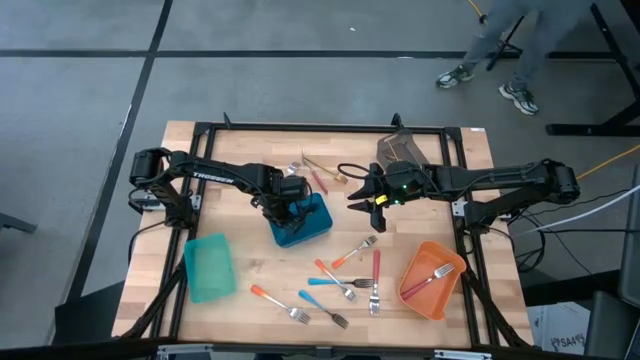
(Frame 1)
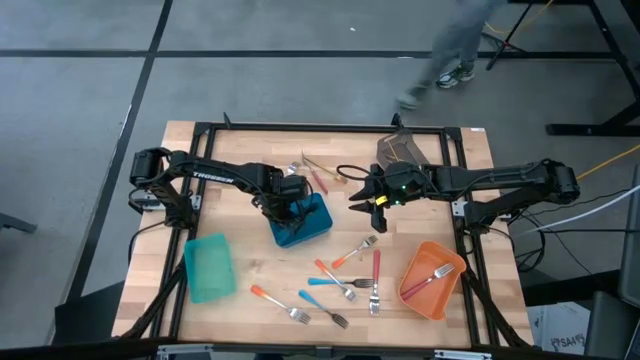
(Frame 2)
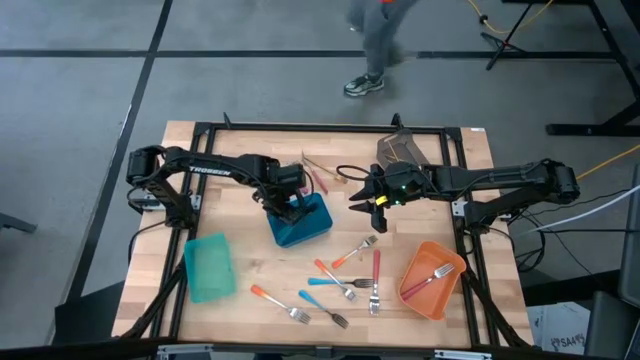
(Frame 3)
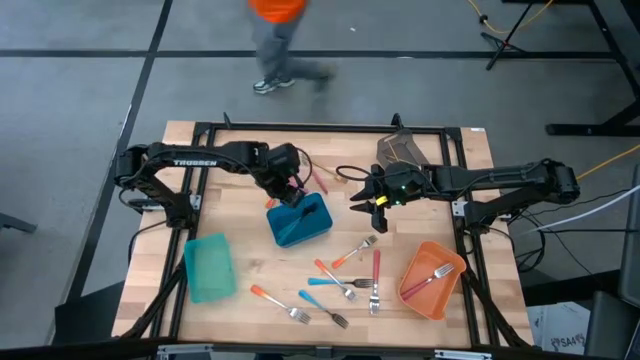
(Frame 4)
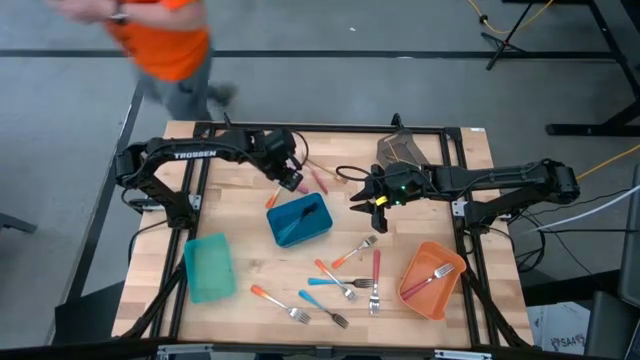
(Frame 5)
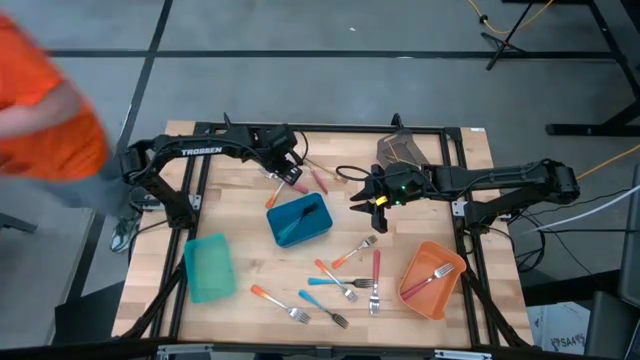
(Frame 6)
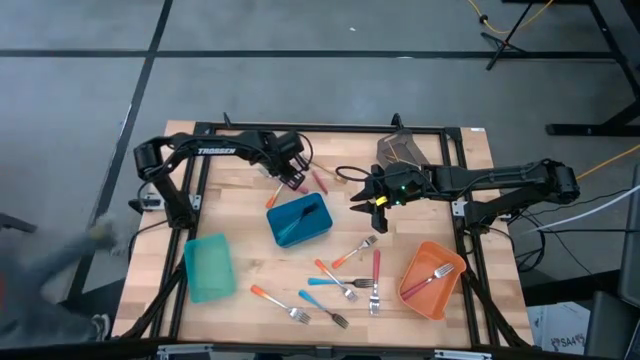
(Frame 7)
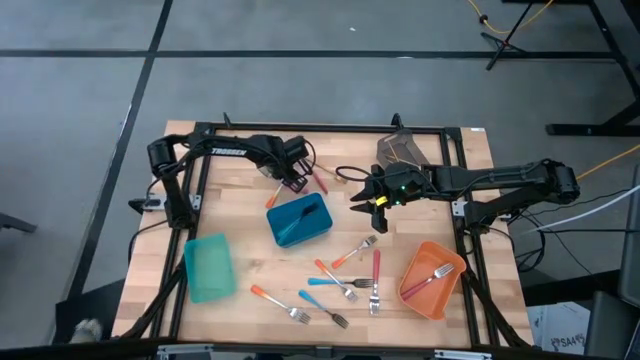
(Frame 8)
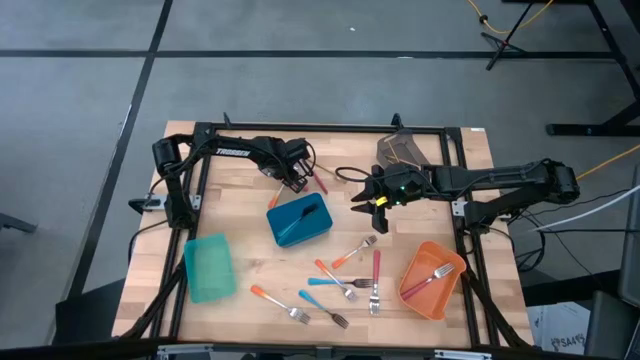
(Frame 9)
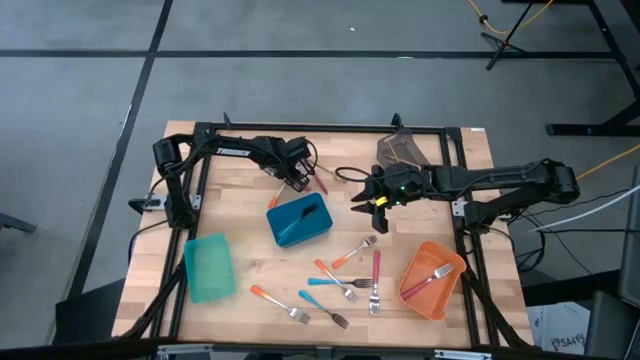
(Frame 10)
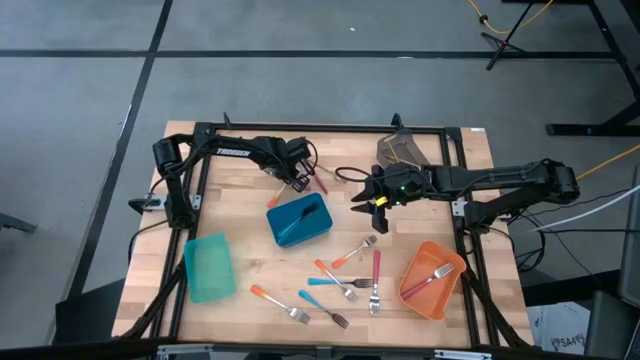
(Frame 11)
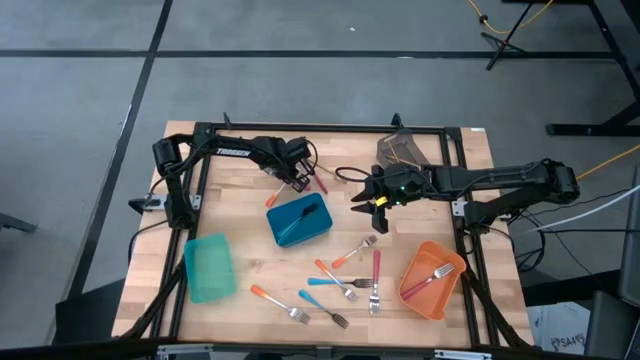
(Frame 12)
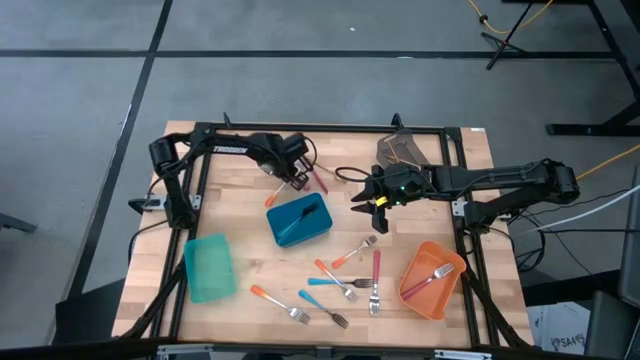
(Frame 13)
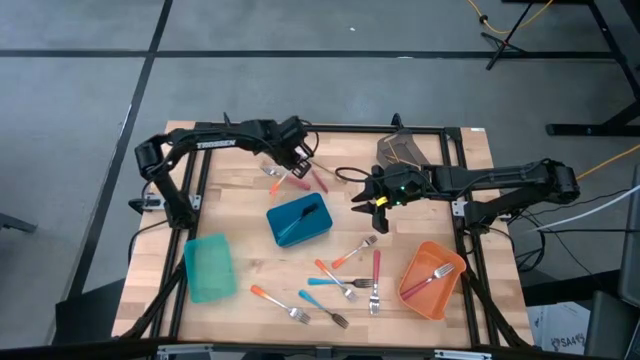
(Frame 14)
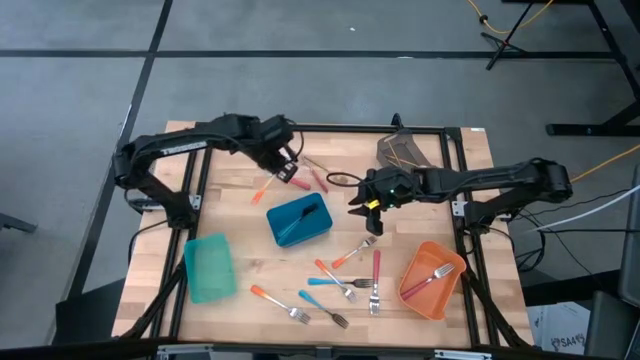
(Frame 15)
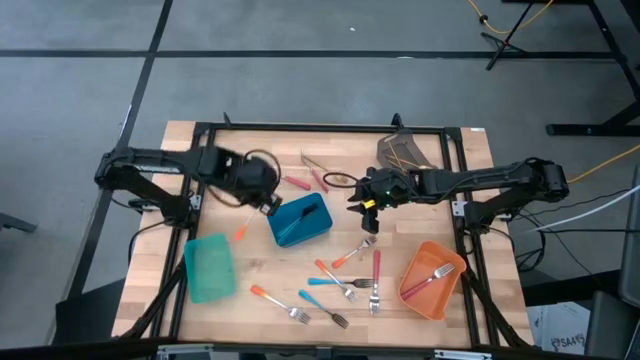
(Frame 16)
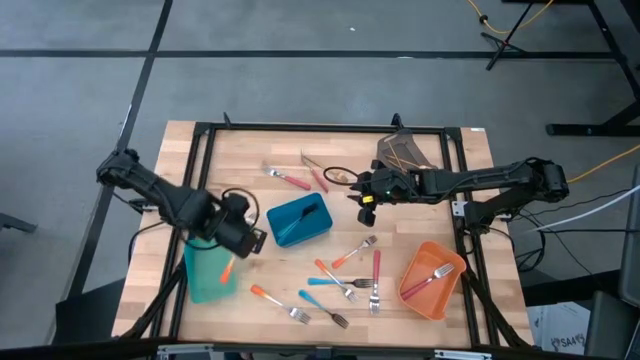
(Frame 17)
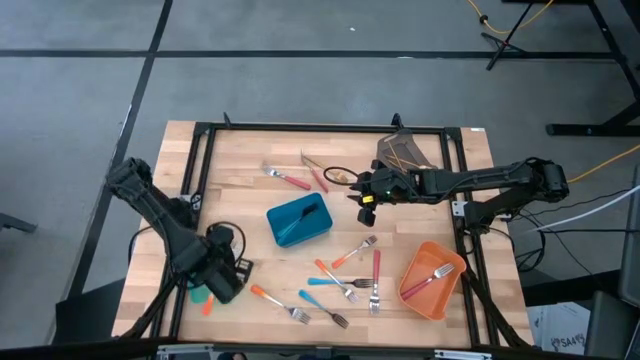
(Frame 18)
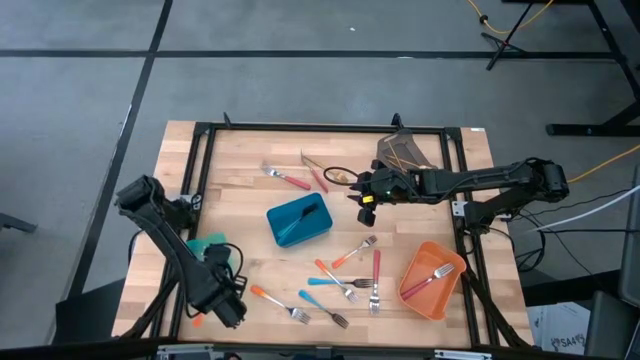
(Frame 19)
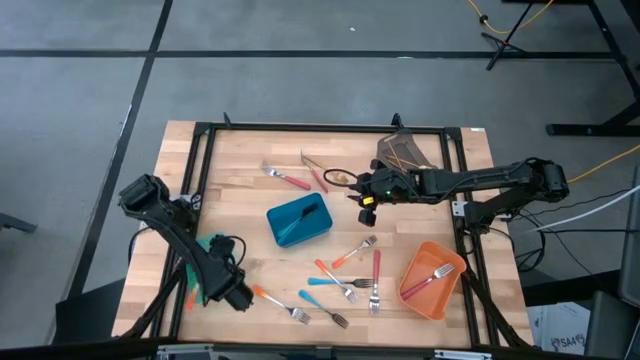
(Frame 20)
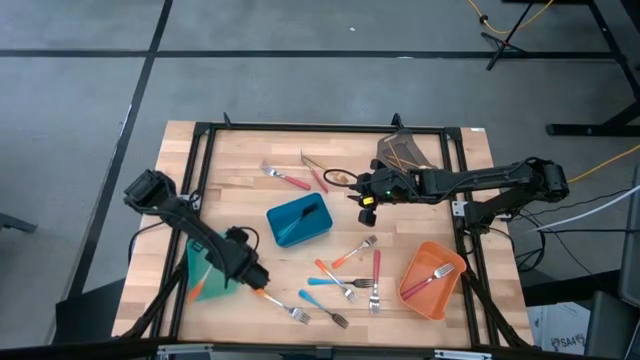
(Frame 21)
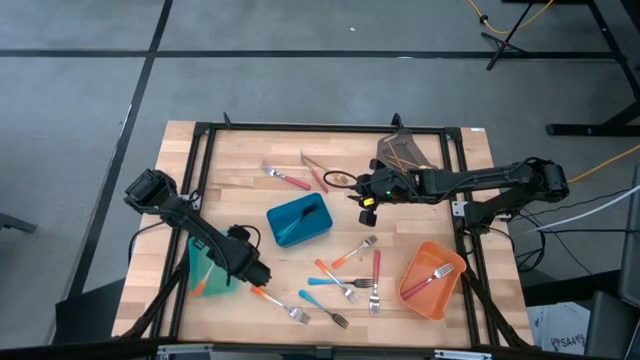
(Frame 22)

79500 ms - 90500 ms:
Task: Sort silverware by color (type)
Put the top left orange fork into the light blue bin

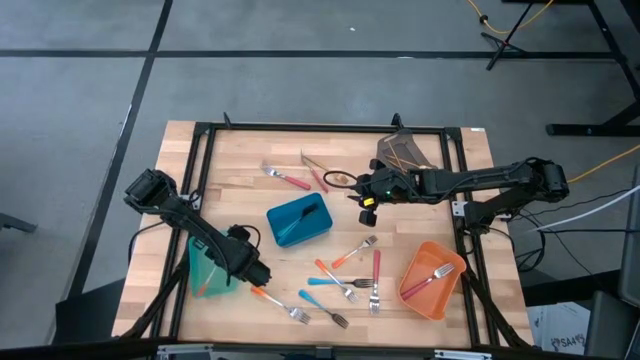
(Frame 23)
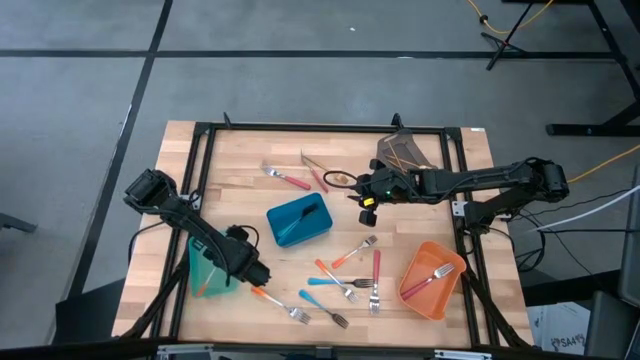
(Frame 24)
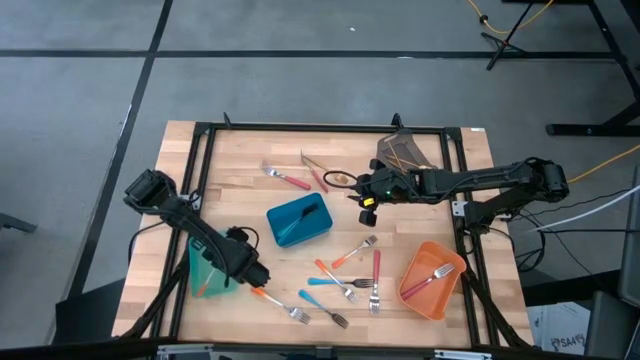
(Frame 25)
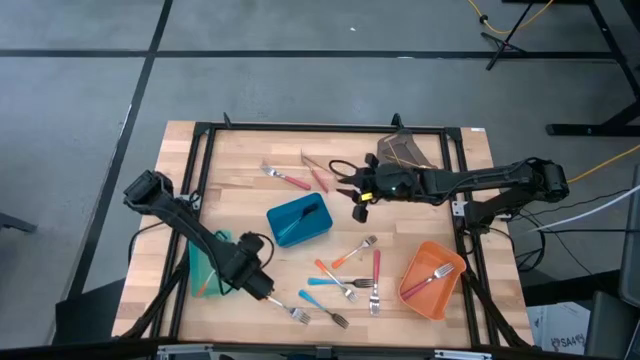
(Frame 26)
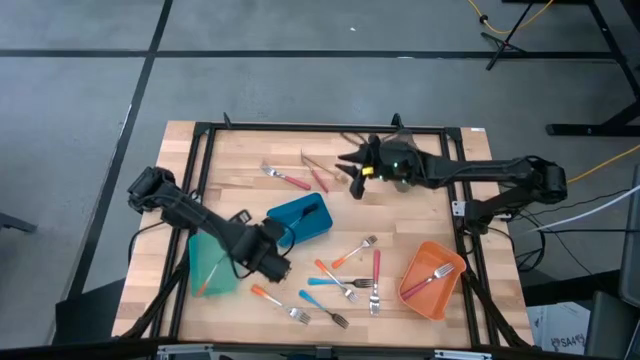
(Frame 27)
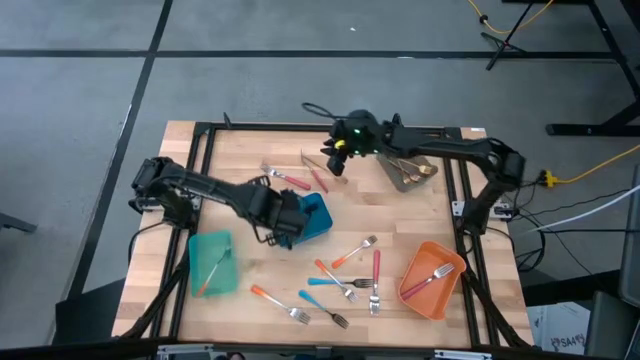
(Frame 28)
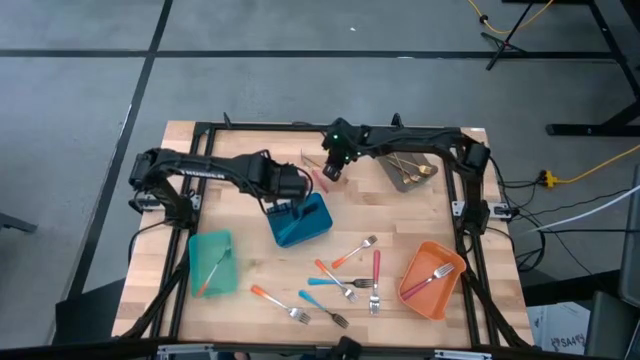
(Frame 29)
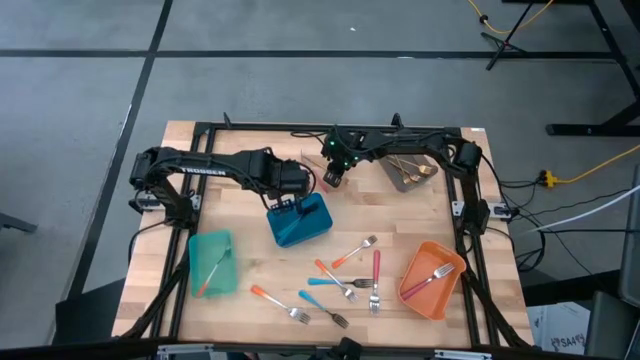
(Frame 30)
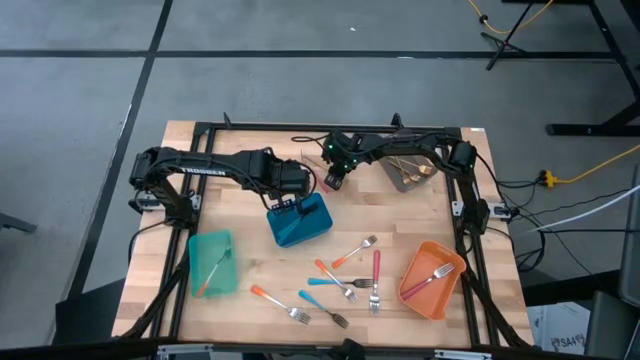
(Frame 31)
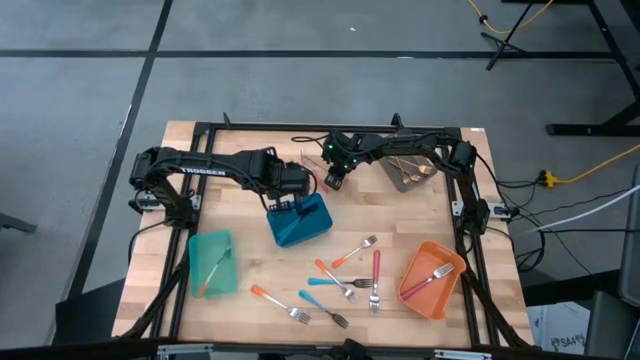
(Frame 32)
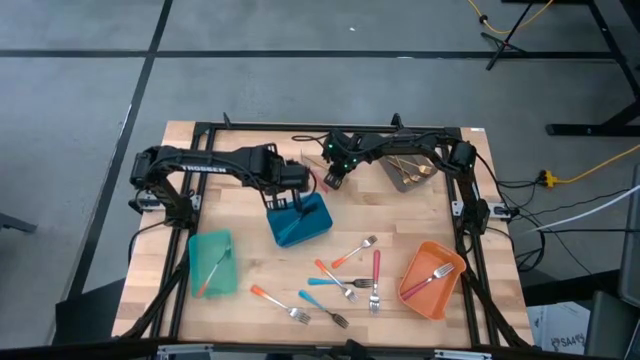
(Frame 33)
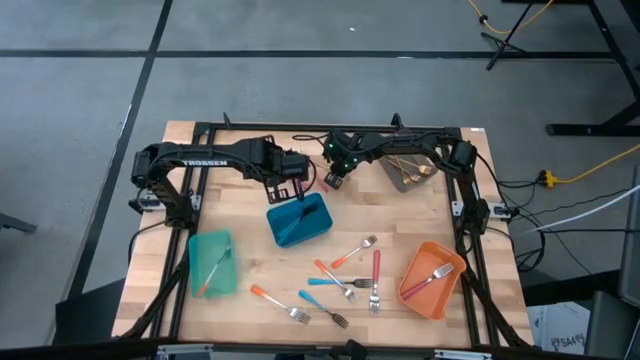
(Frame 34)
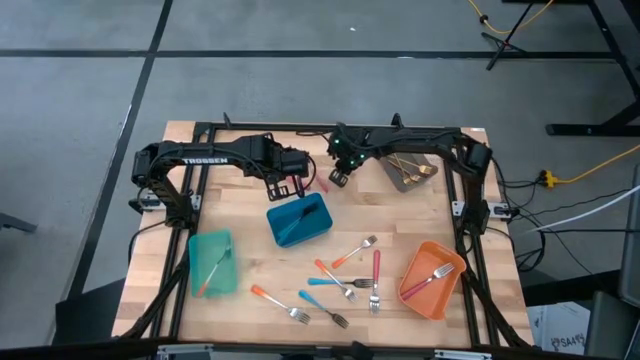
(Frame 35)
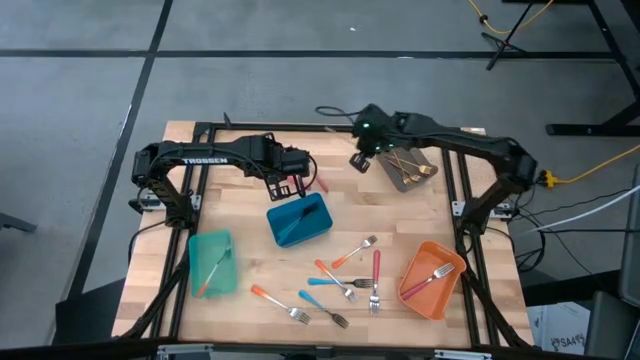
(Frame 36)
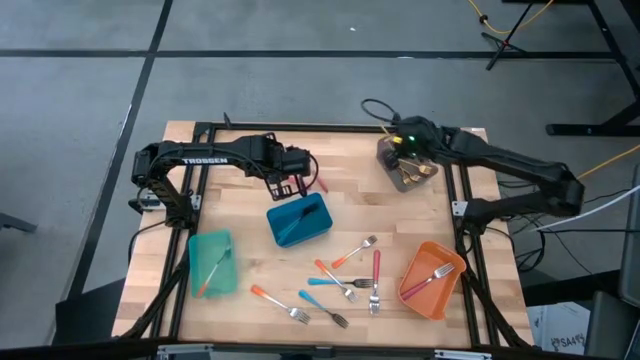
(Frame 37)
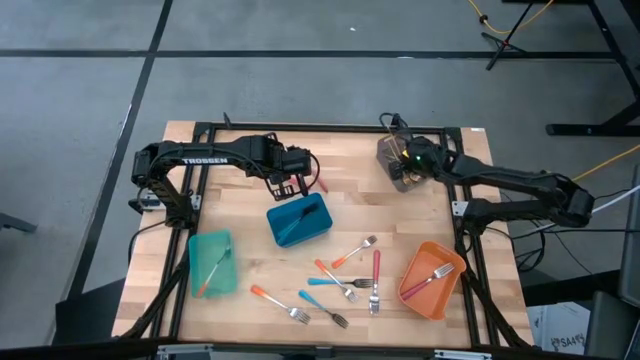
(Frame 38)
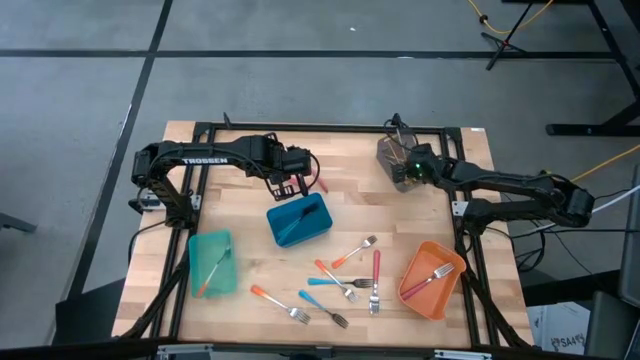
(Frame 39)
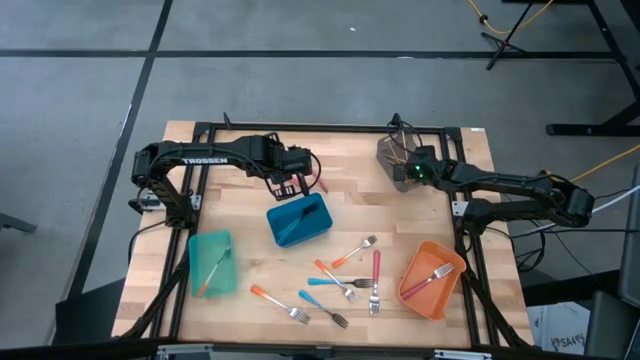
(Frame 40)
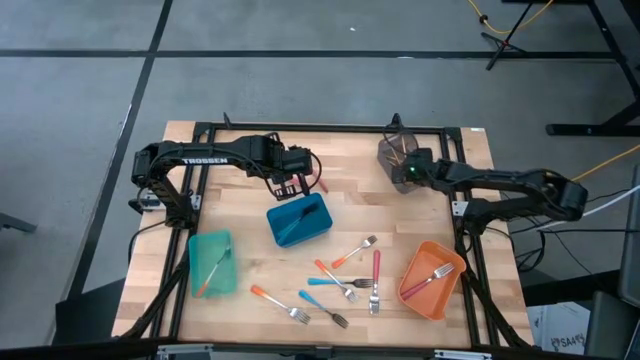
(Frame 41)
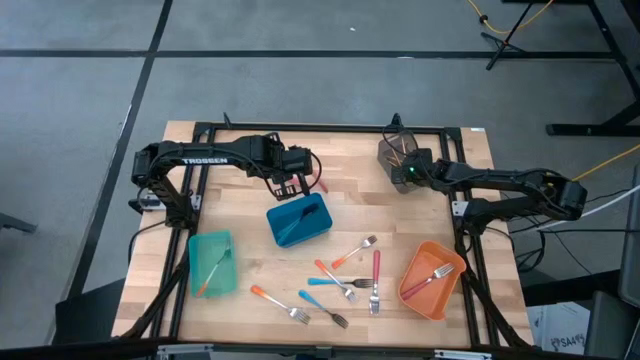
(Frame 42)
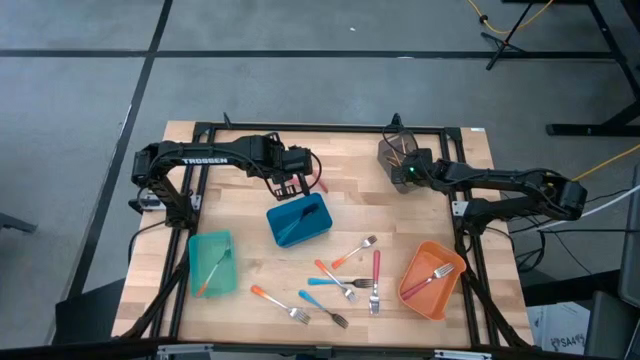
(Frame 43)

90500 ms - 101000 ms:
Put the golden fork into the gray bin
